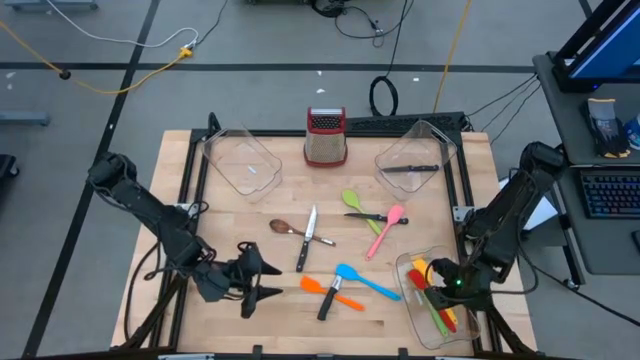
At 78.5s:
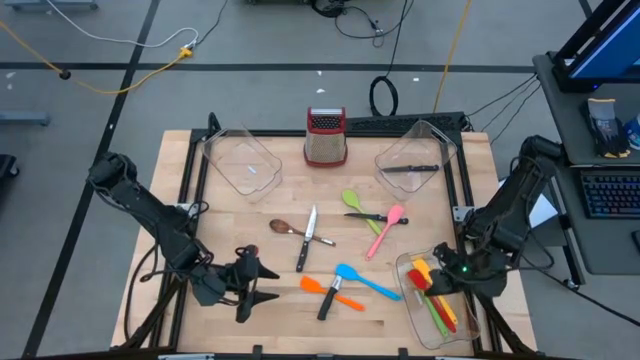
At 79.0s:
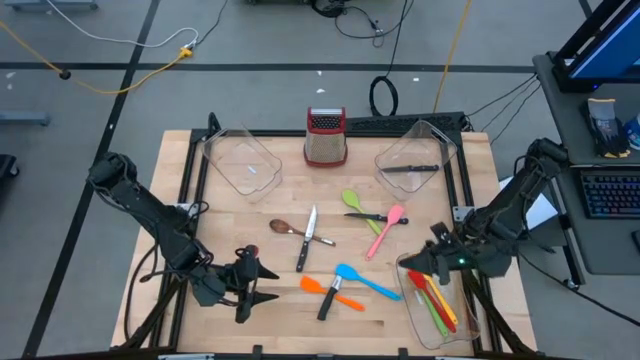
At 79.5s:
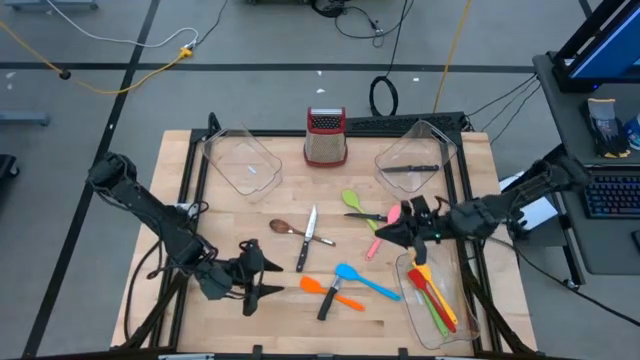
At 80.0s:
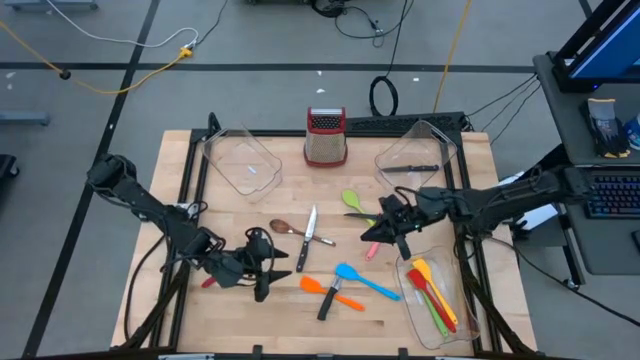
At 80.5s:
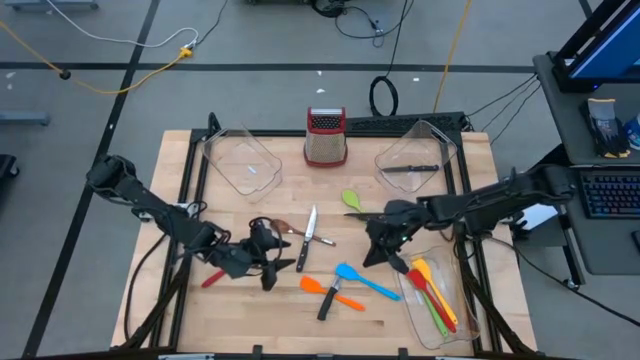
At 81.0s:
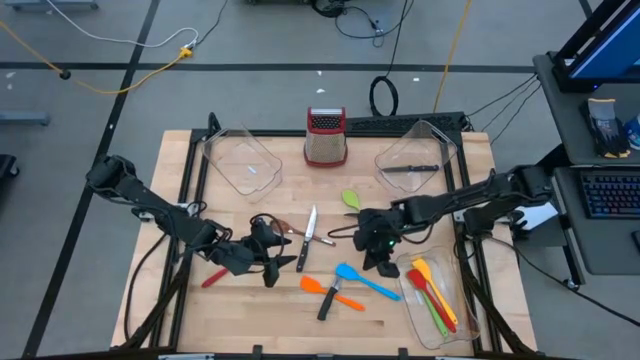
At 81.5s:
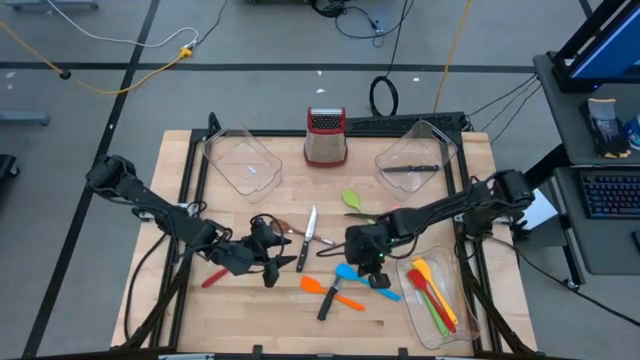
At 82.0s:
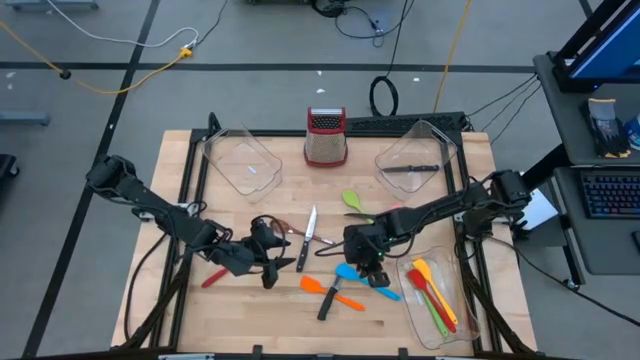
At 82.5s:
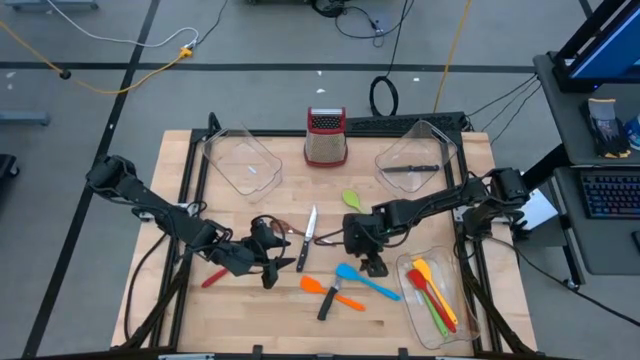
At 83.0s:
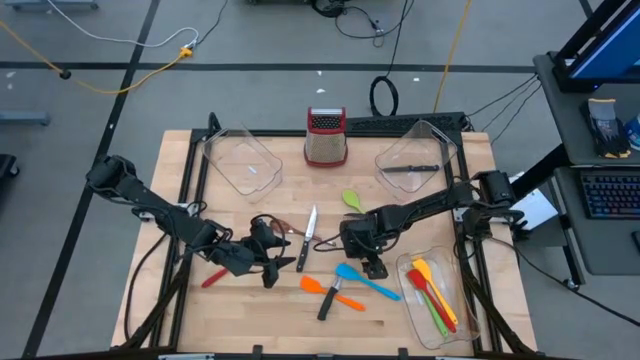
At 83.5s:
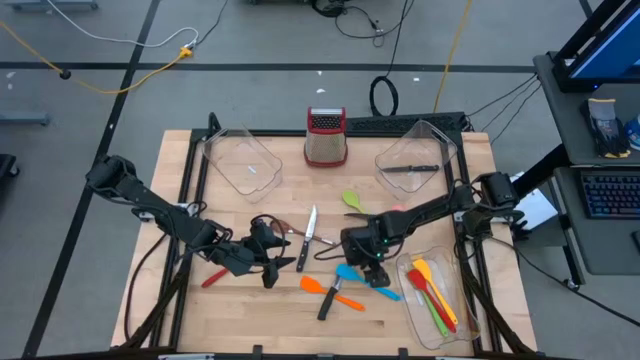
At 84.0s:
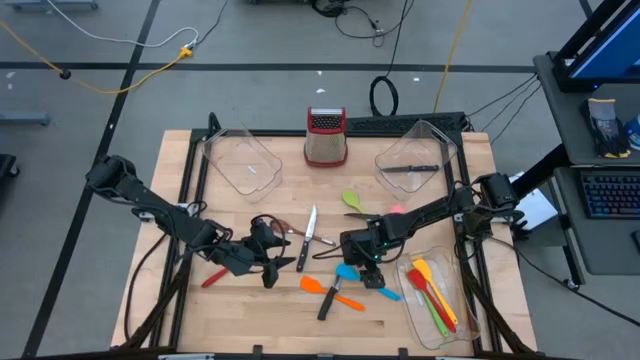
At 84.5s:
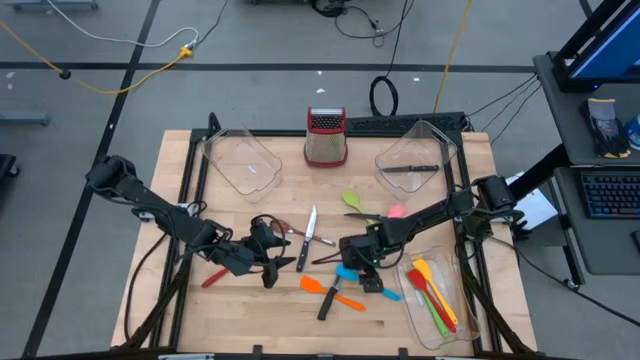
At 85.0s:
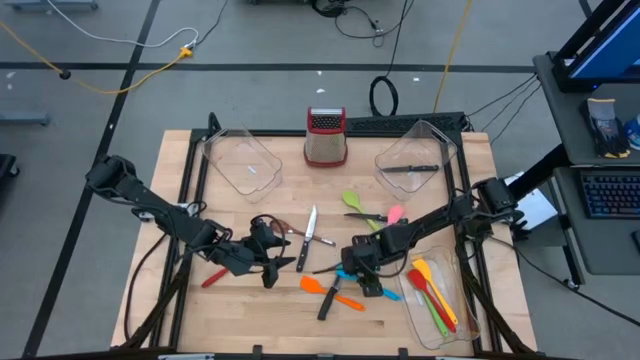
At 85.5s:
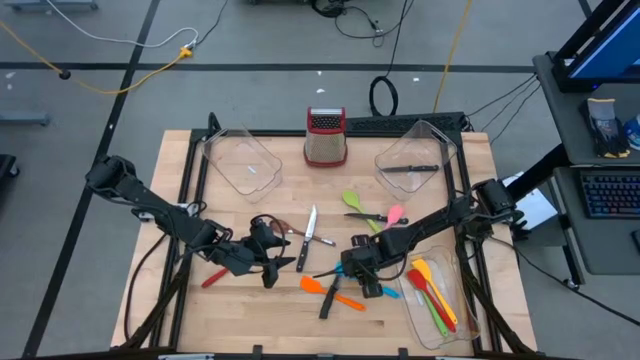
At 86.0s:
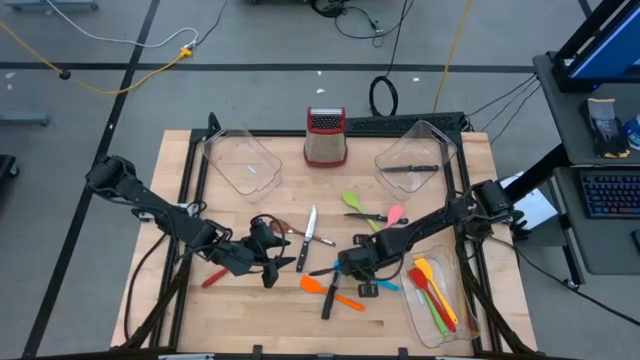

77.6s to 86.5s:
Task: Pick & Place Kitchen Items
Put the blue spatula into the bottom transparent bin

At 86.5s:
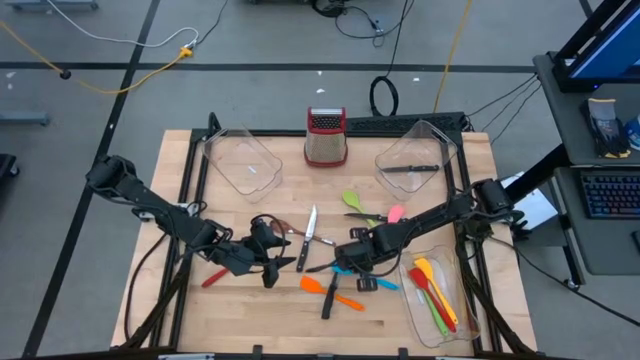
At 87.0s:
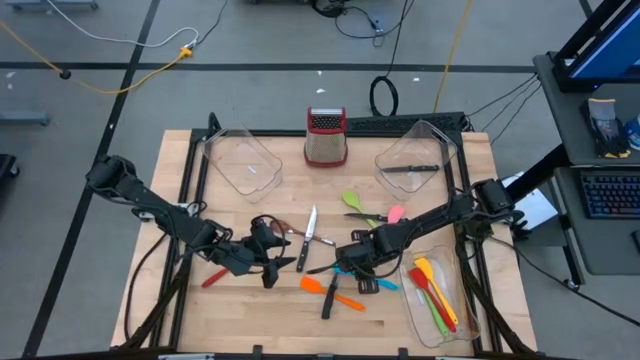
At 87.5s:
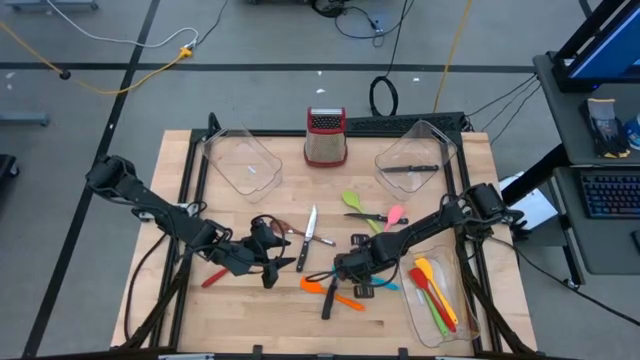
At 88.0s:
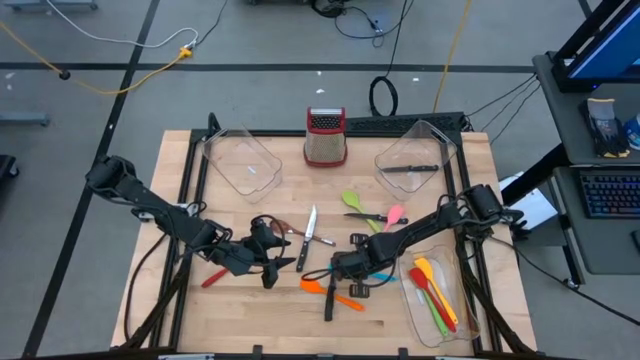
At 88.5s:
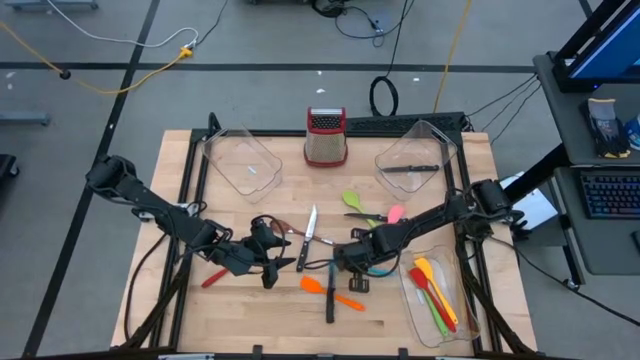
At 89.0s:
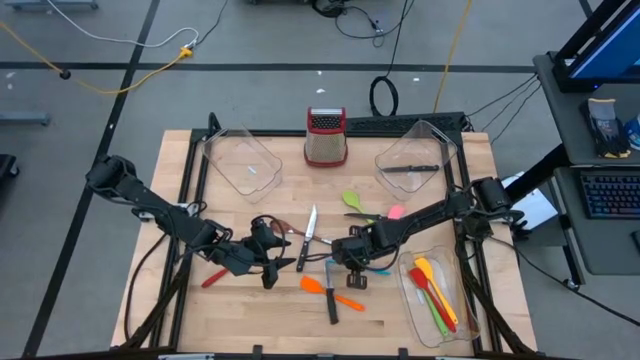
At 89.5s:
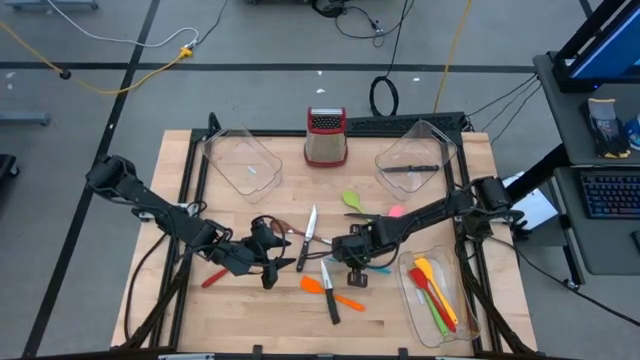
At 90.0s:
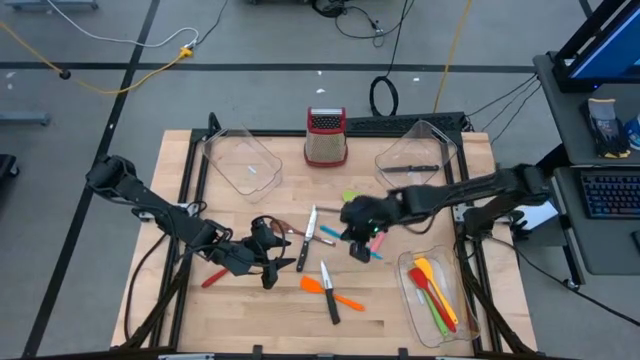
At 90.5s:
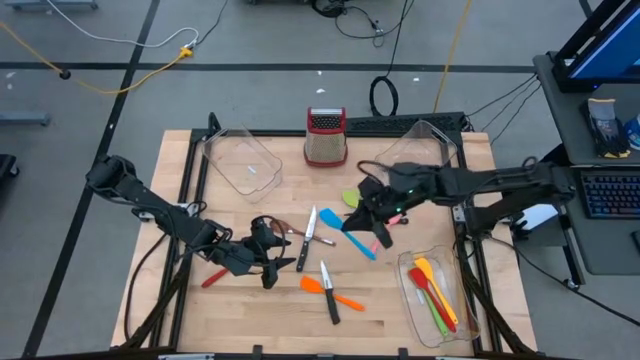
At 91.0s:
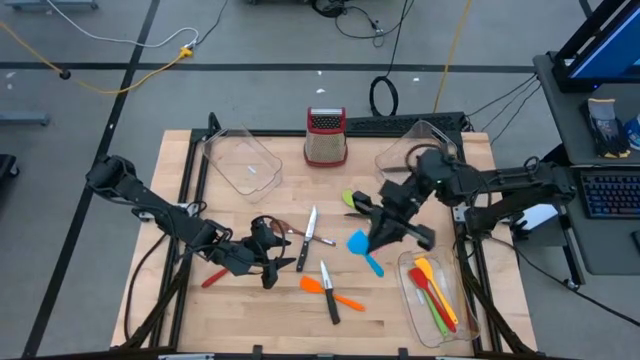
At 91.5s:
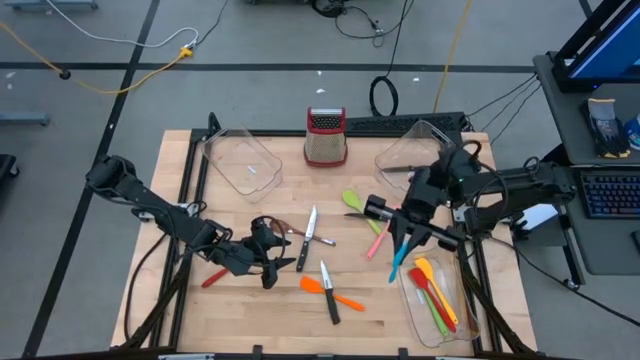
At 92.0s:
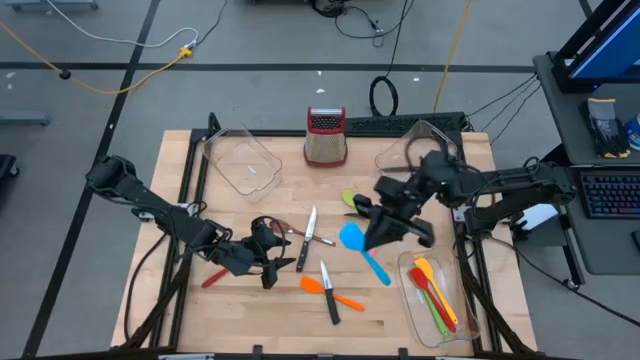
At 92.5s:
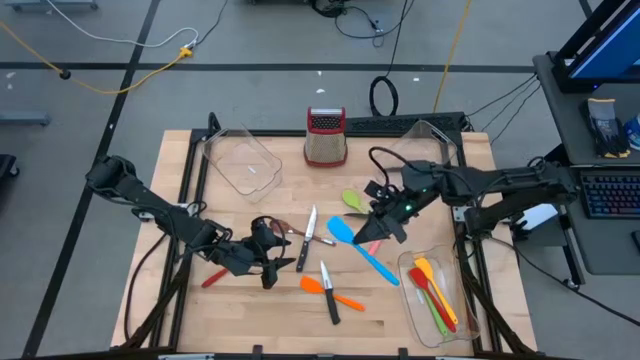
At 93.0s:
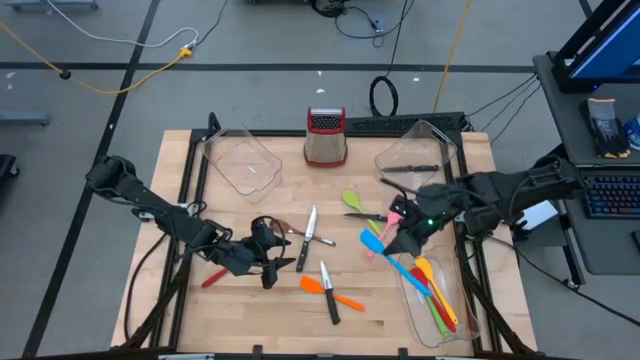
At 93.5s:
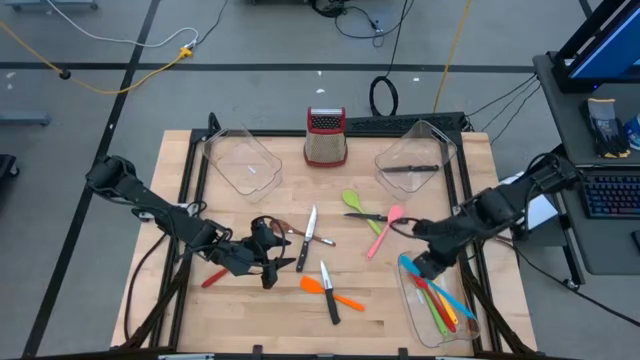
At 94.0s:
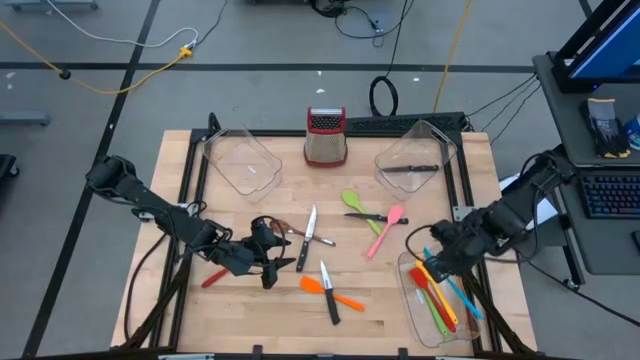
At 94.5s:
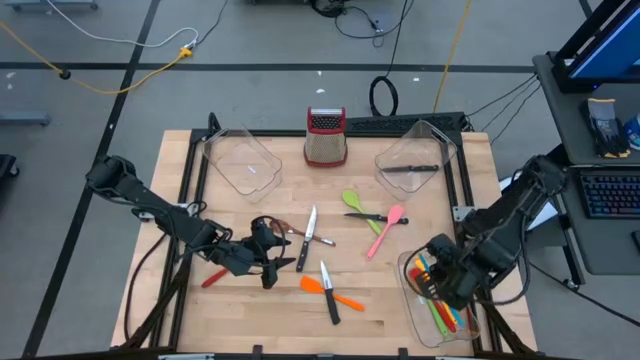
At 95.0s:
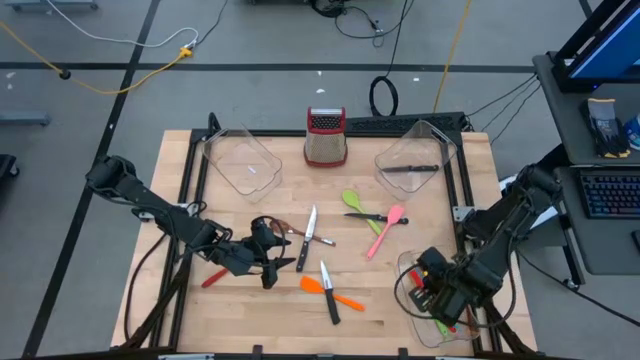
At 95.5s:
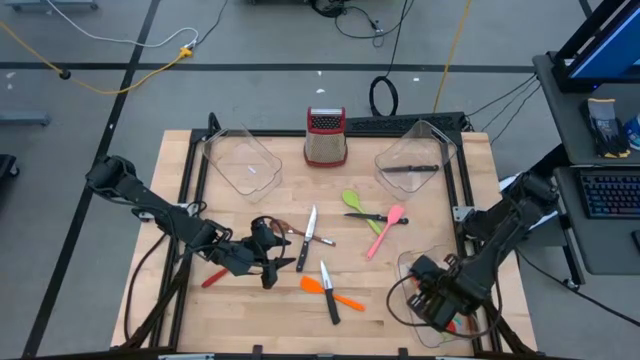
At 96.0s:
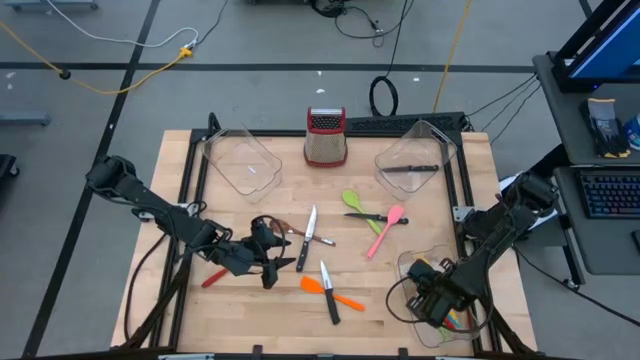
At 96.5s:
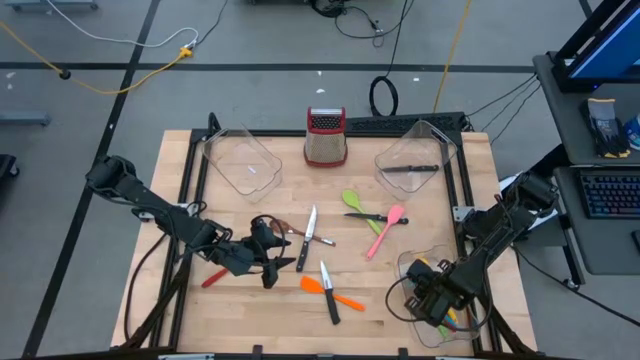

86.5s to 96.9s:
Put the blue spatula into the bottom transparent bin

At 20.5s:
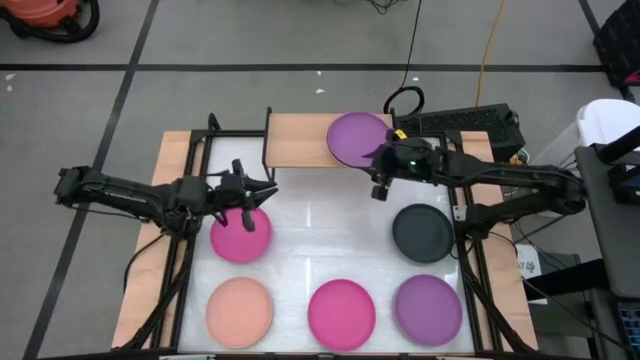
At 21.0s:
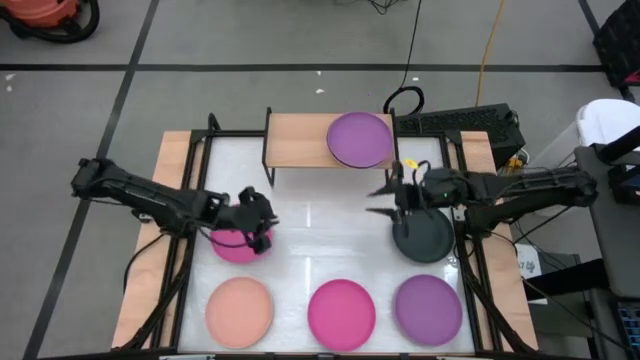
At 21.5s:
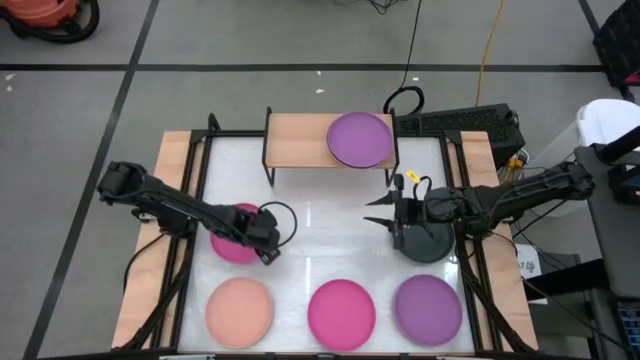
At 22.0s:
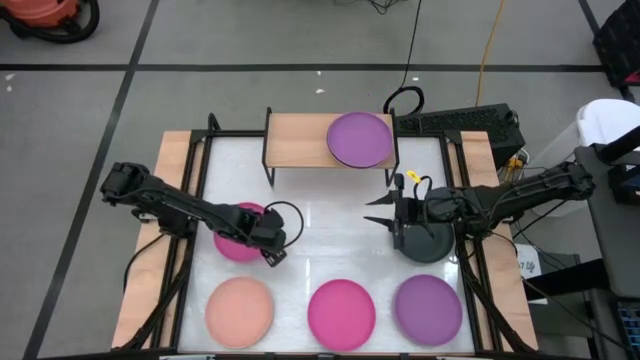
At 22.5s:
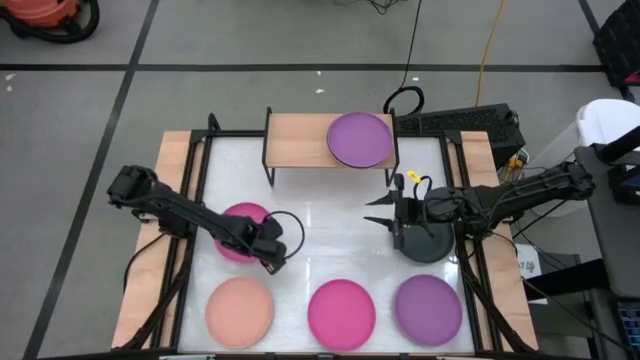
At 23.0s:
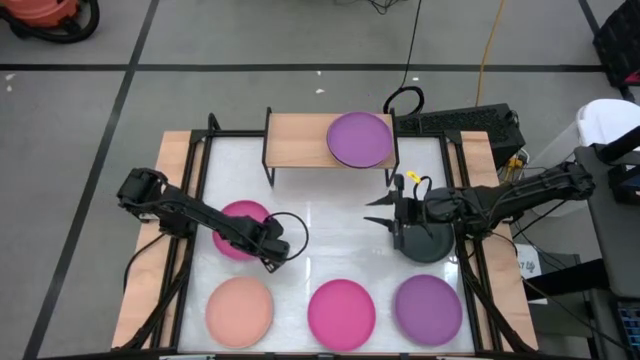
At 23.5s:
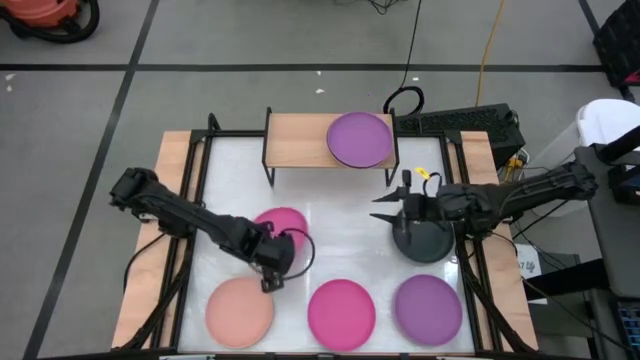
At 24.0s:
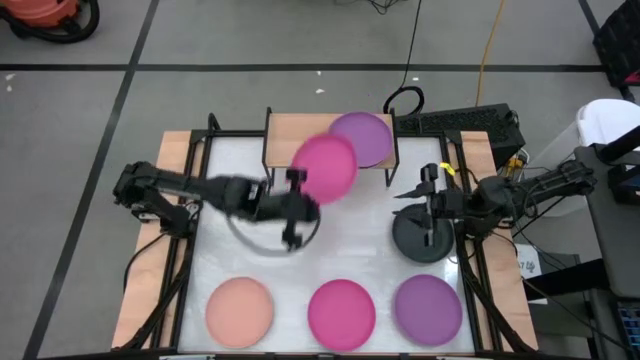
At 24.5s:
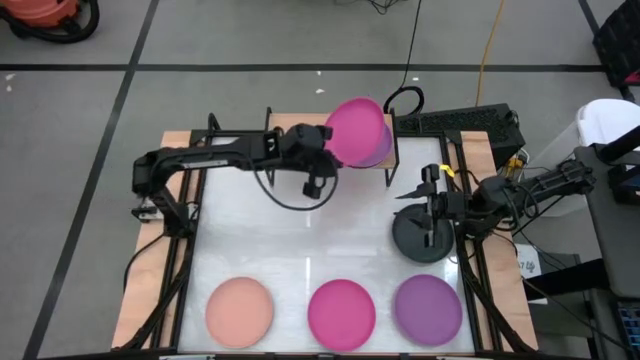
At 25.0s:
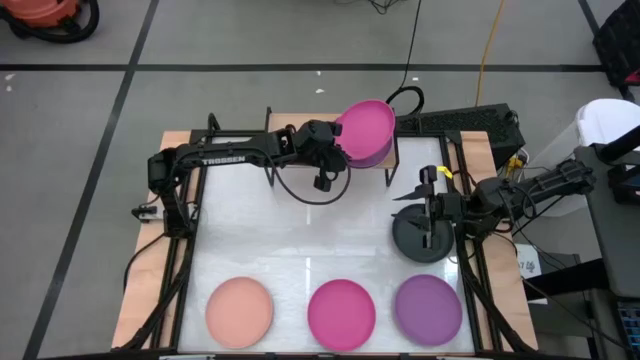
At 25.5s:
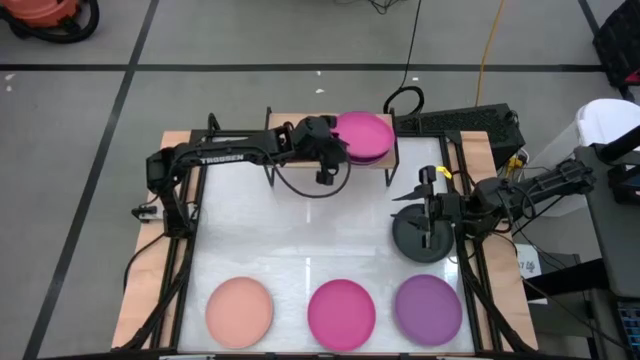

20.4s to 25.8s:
Task: Place and stack plates onto a shelf
Stack the left pink plate on the purple plate on the shelf
